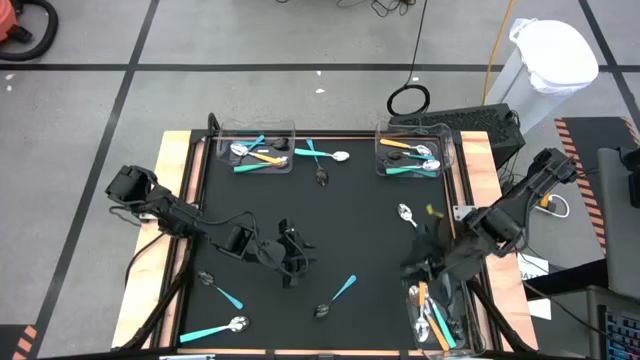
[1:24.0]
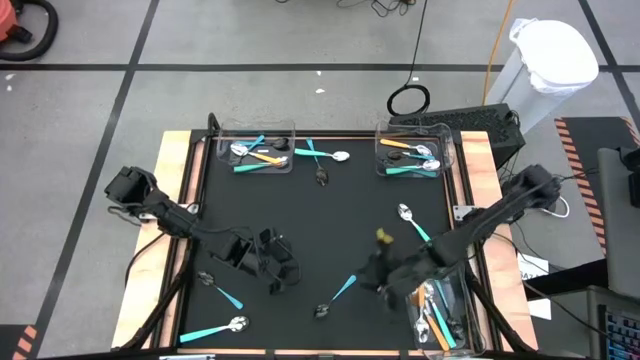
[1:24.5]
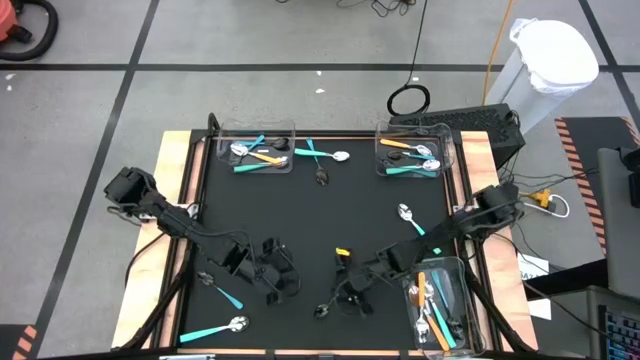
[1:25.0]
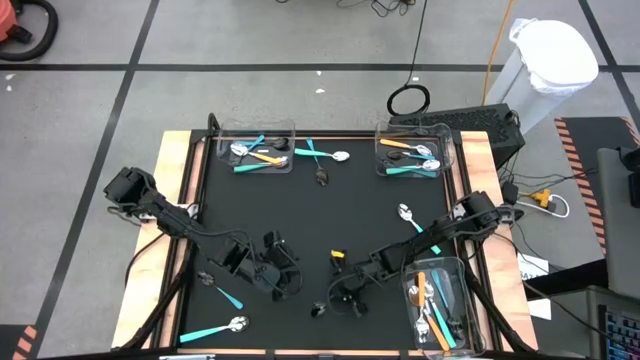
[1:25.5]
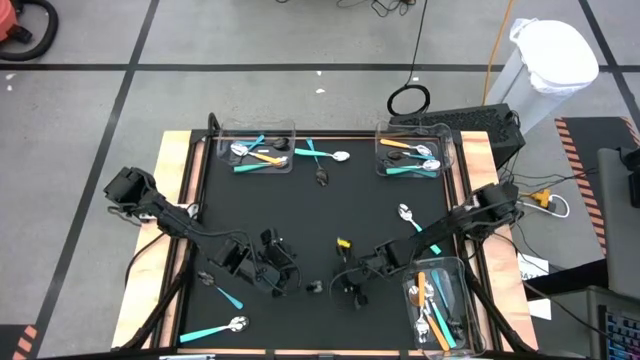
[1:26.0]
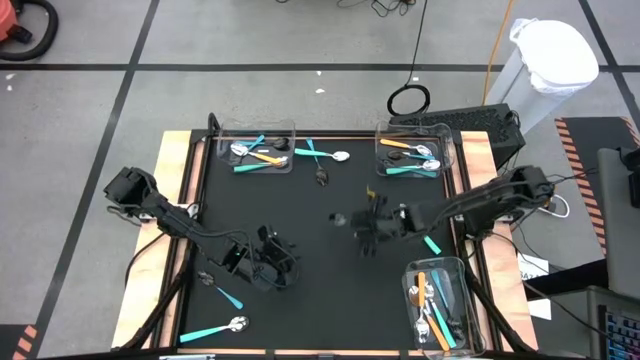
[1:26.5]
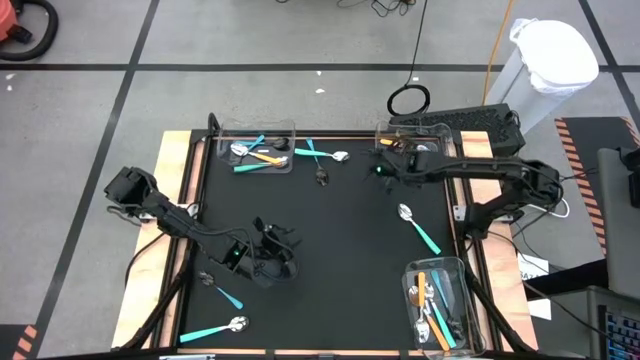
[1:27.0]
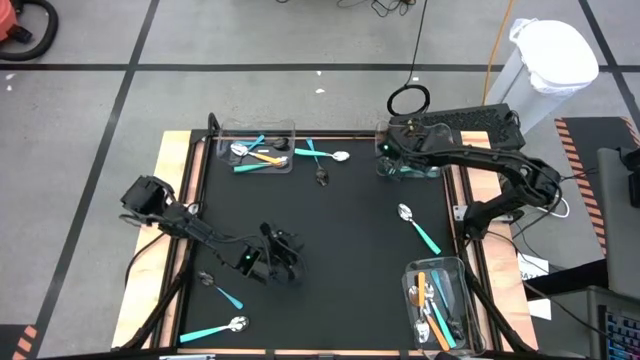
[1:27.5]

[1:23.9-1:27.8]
Task: Sort silverware by color (type)
Put the blue spoon into the top right transparent bin

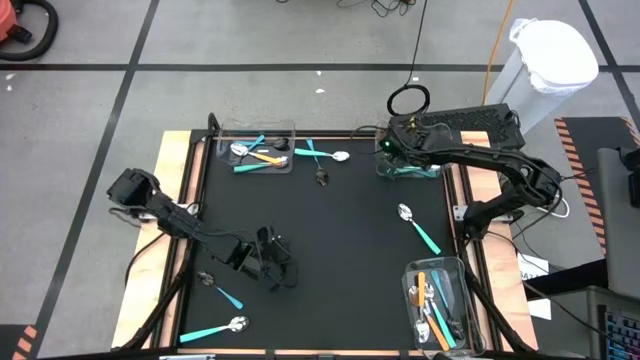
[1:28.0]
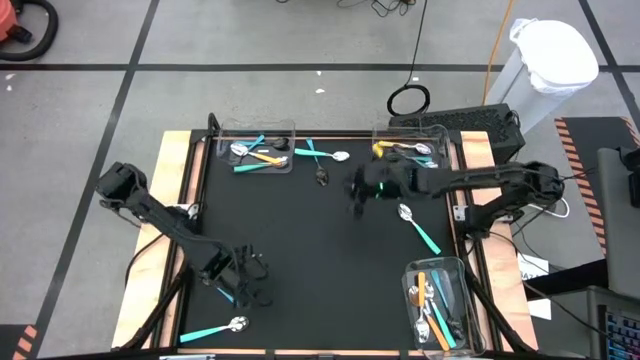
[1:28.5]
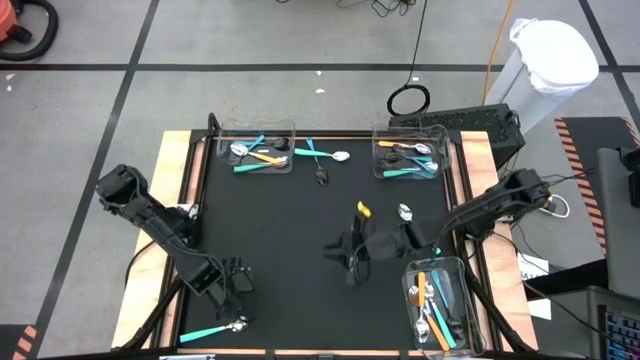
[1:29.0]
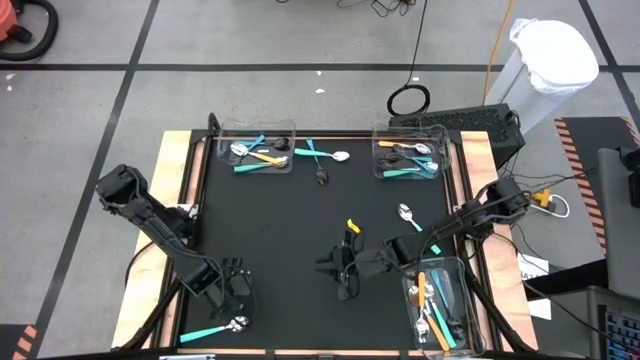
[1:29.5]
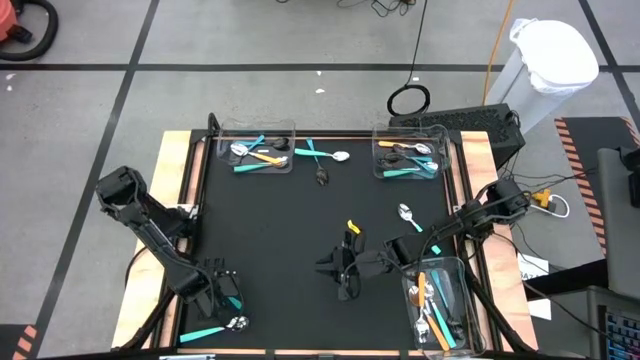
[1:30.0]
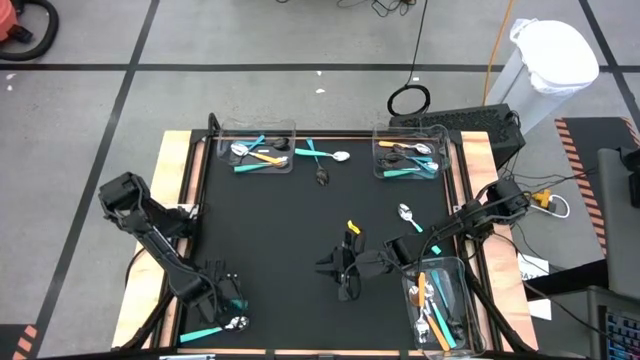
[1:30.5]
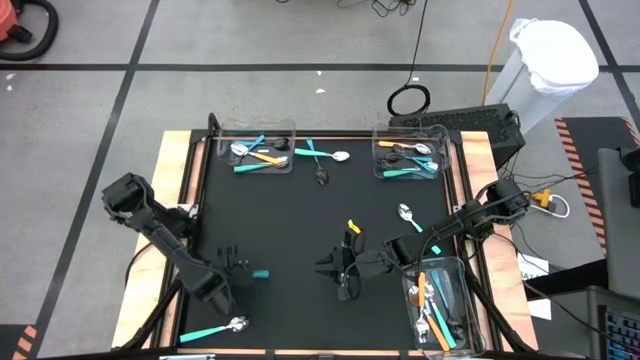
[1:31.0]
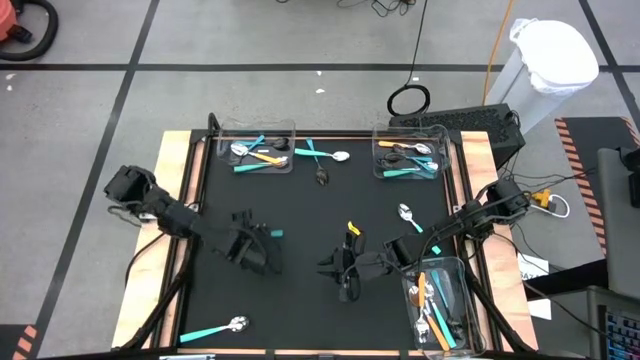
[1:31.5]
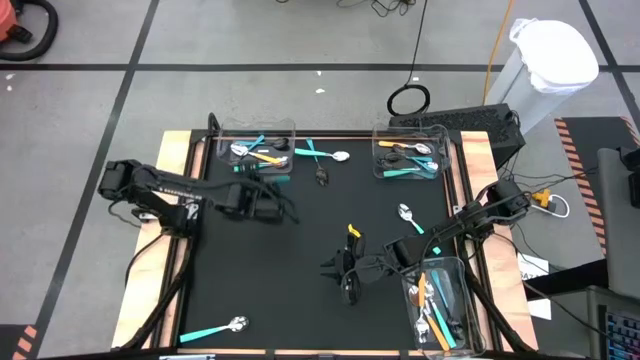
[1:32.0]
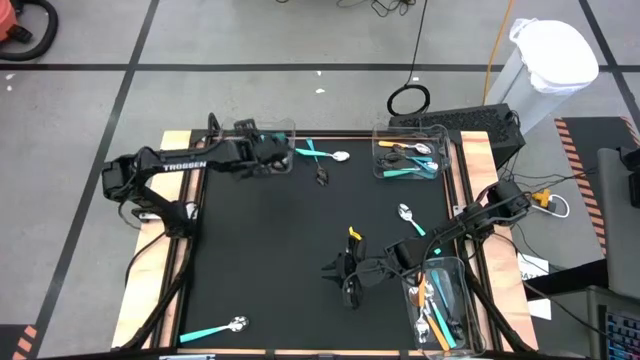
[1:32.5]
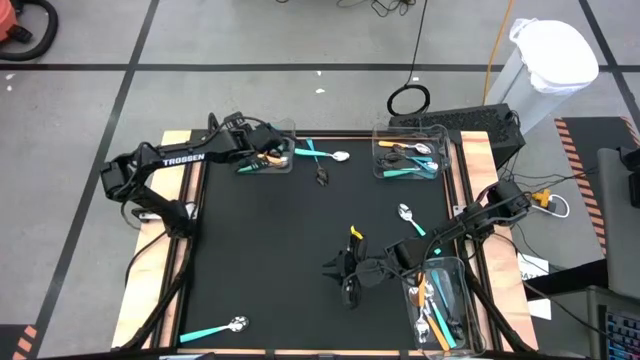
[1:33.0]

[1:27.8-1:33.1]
Put the blue spoon into the top left transparent bin

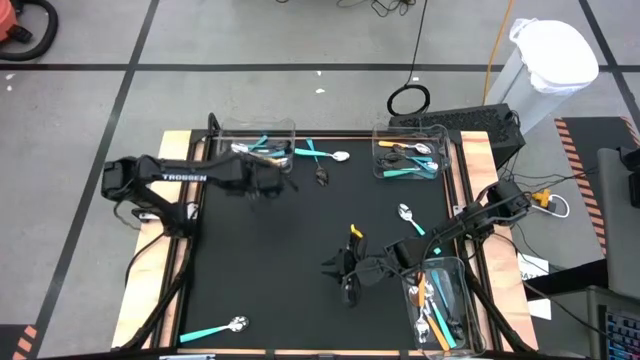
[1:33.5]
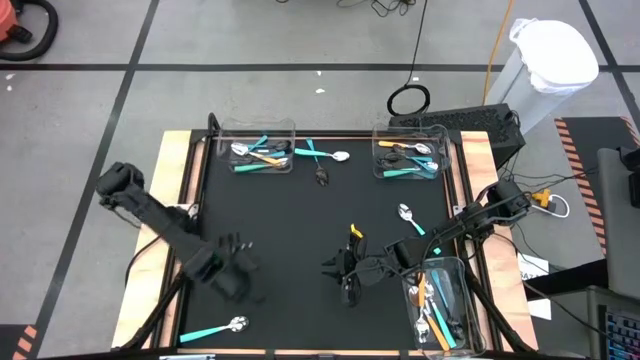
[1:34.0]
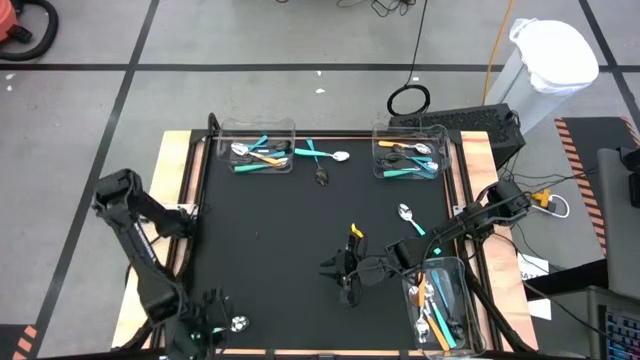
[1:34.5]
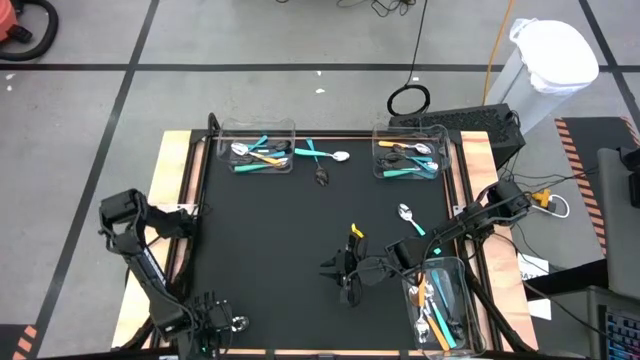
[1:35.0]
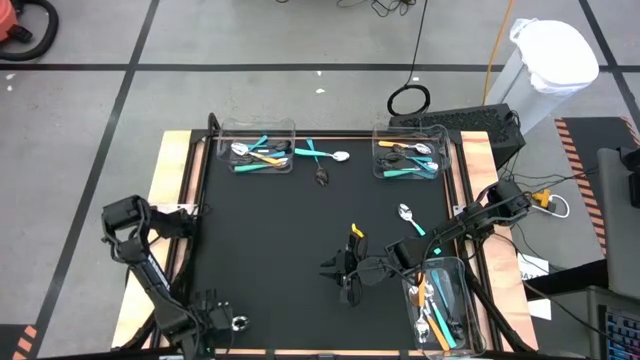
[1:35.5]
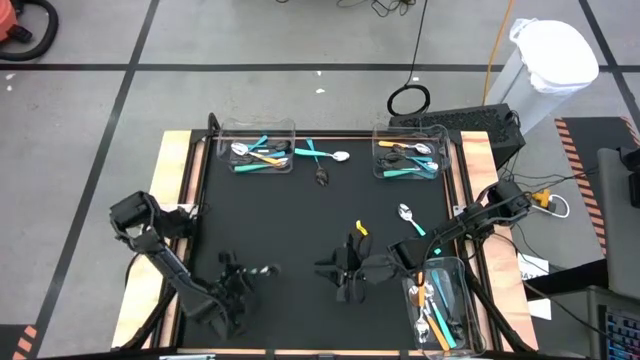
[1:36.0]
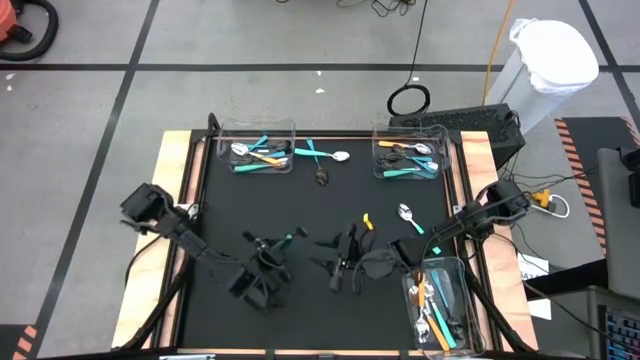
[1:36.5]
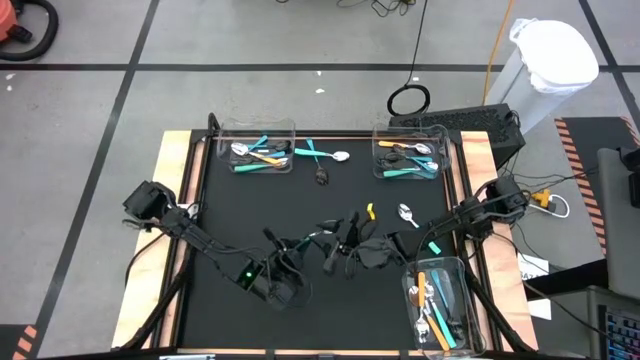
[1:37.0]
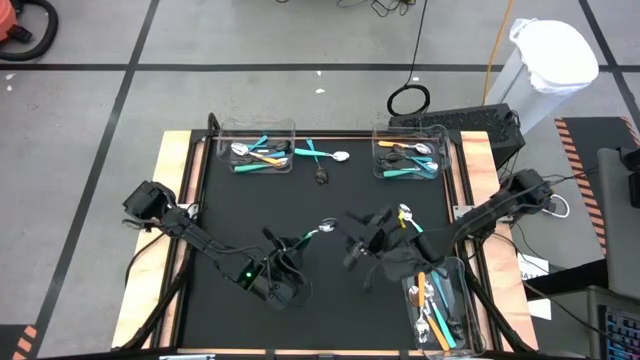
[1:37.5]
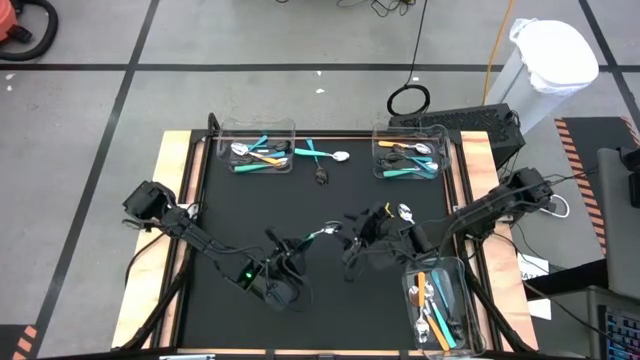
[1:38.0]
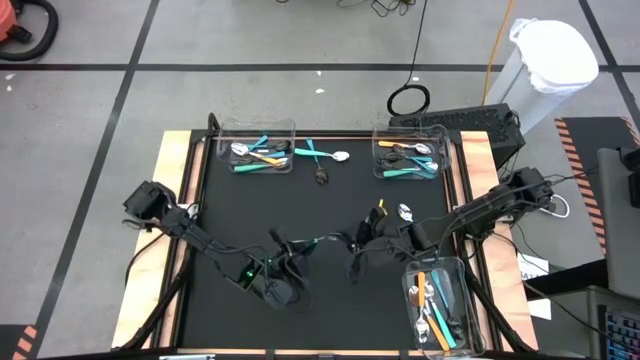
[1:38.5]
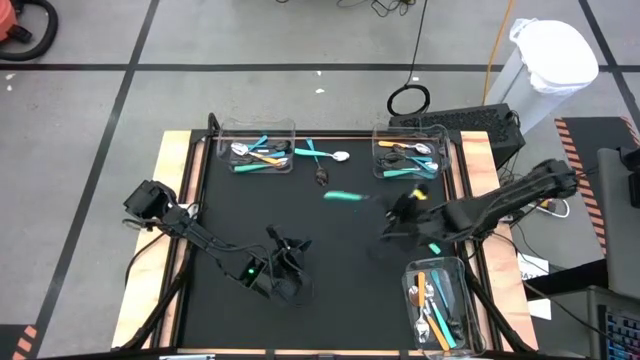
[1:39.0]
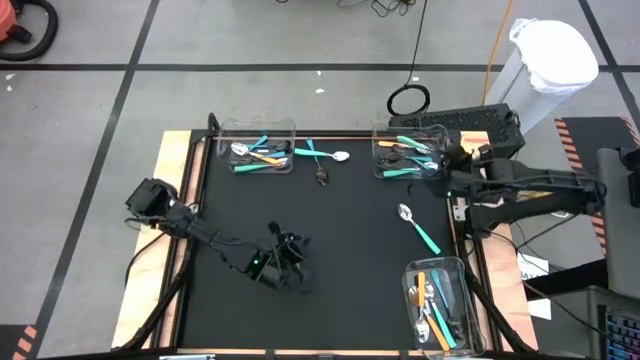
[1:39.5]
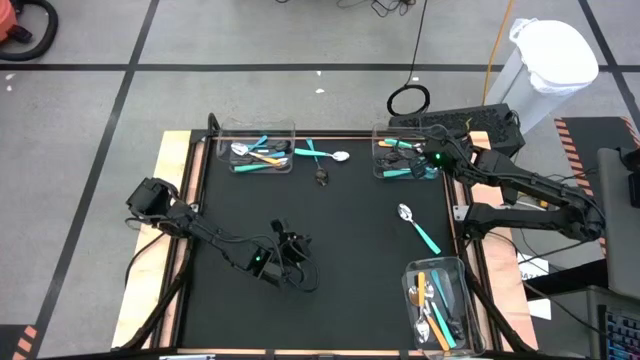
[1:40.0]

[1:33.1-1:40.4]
Put the light blue spoon into the top right transparent bin

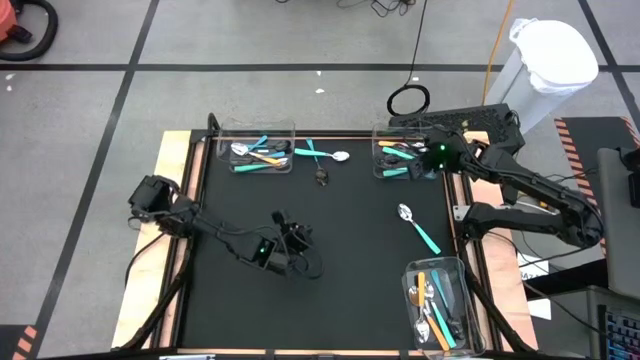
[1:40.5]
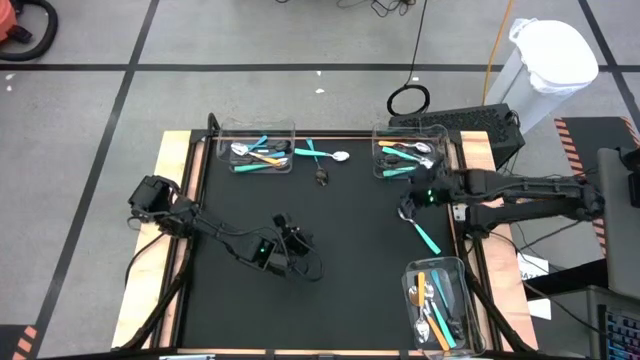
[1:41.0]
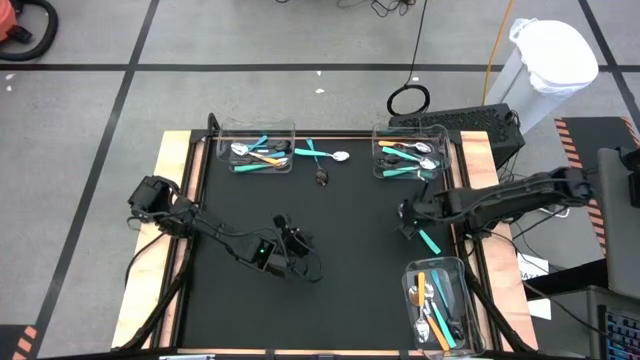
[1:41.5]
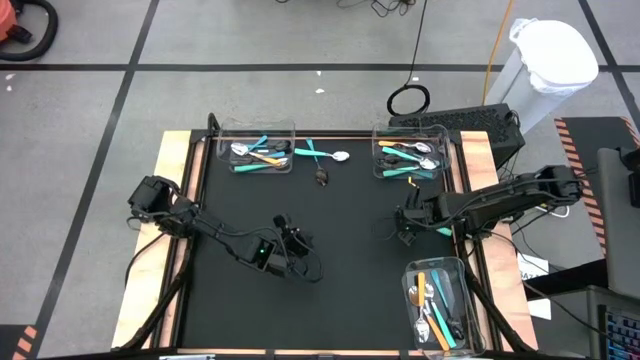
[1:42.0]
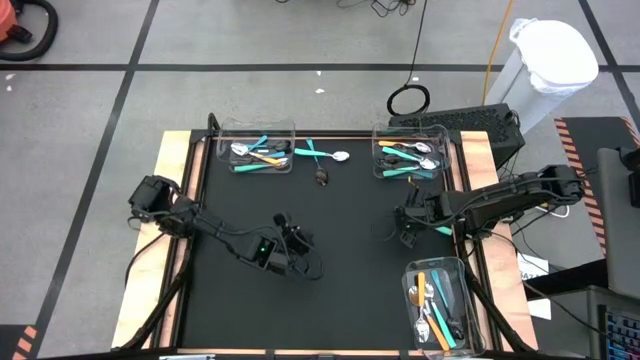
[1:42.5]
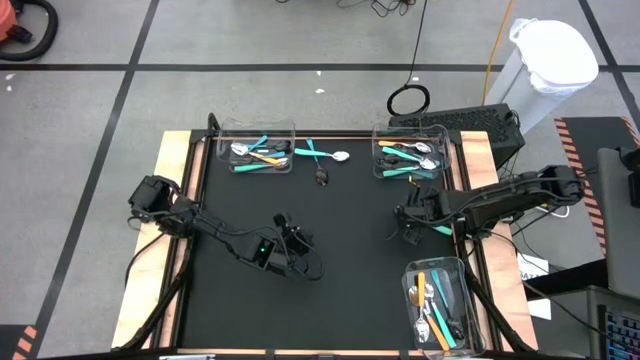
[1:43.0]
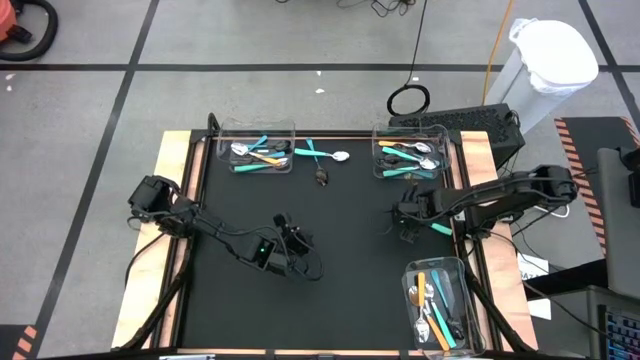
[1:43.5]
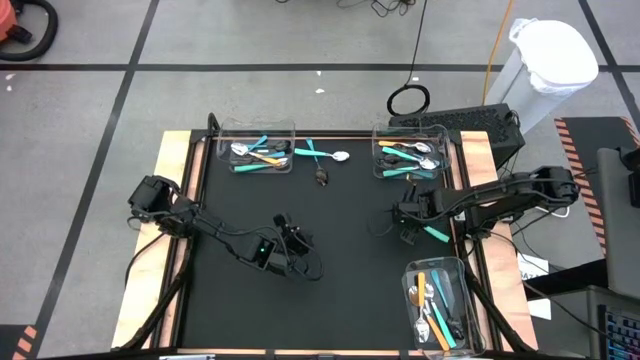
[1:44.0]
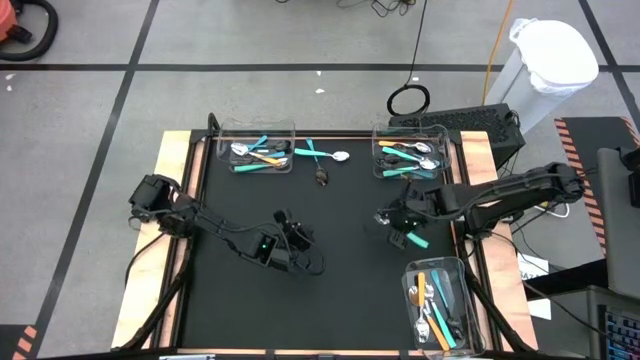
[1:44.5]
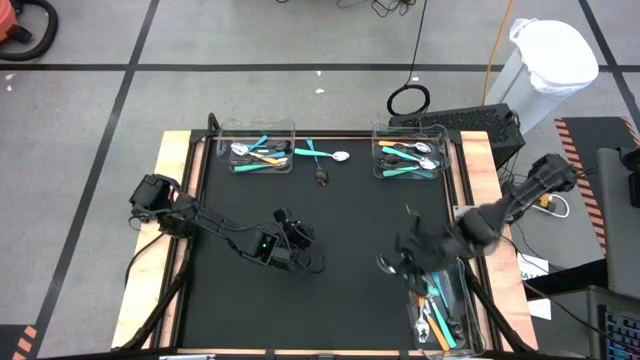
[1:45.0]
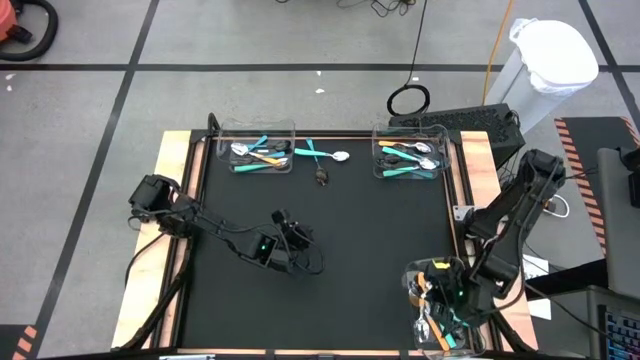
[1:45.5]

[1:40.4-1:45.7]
Put the light blue spoon into the bottom right transparent bin
